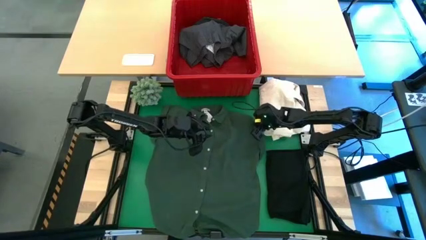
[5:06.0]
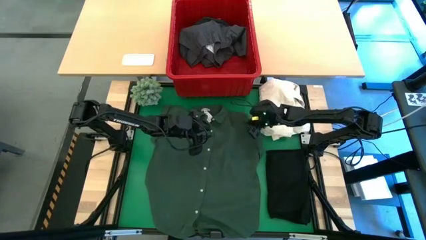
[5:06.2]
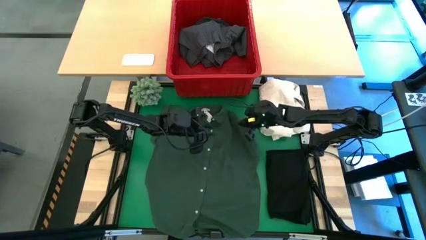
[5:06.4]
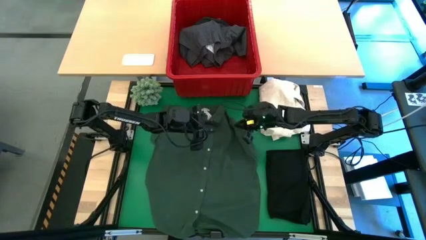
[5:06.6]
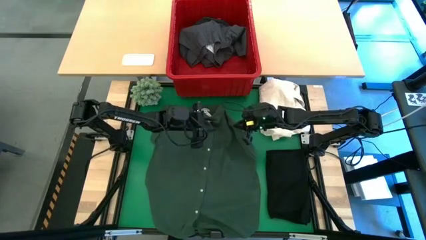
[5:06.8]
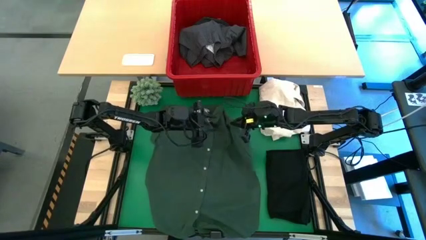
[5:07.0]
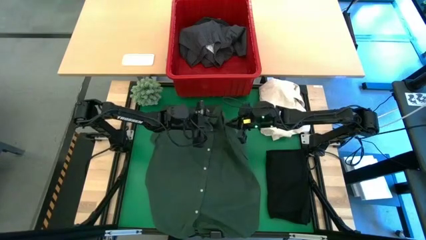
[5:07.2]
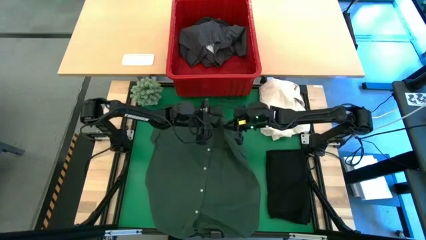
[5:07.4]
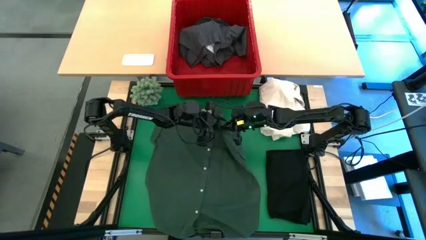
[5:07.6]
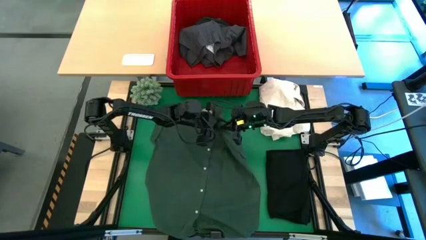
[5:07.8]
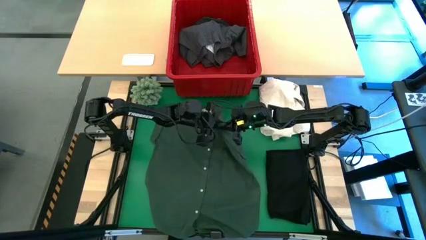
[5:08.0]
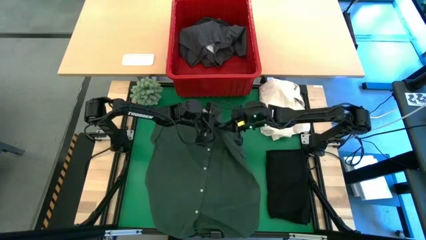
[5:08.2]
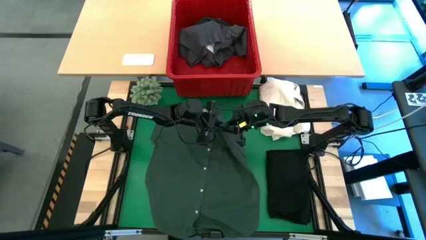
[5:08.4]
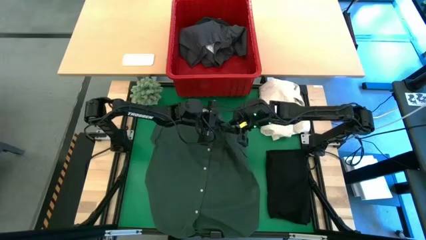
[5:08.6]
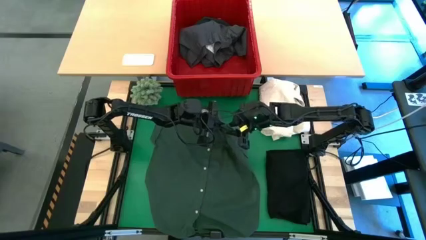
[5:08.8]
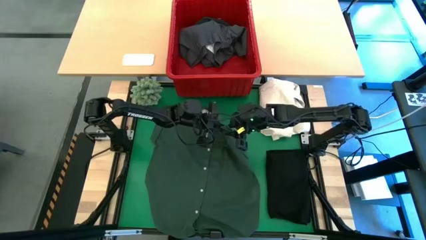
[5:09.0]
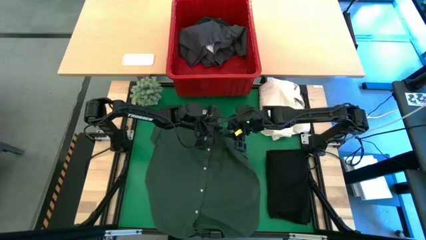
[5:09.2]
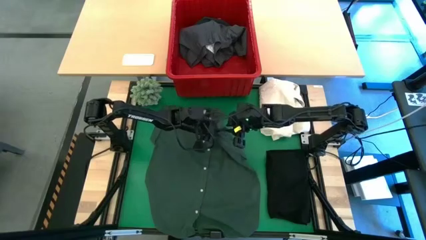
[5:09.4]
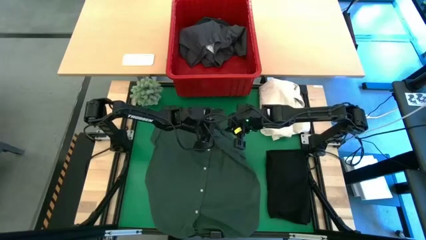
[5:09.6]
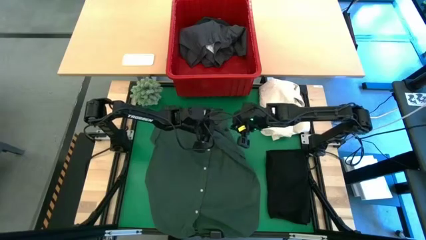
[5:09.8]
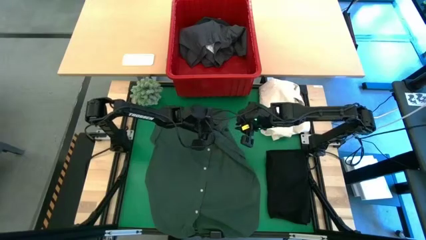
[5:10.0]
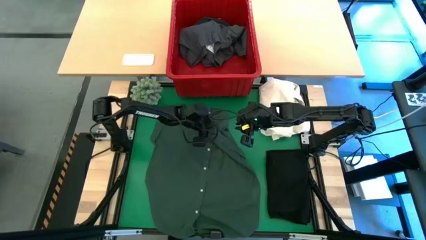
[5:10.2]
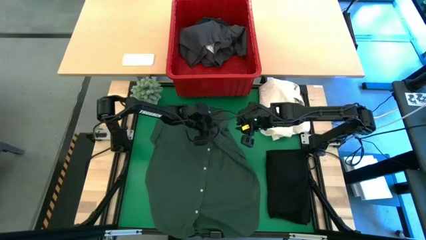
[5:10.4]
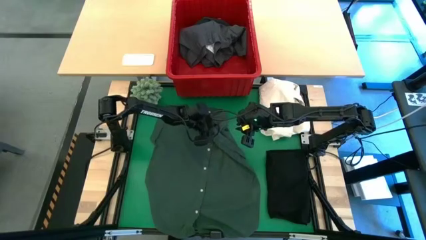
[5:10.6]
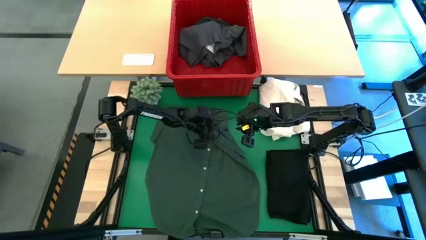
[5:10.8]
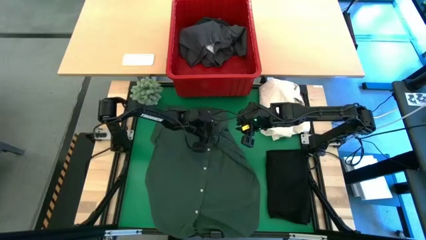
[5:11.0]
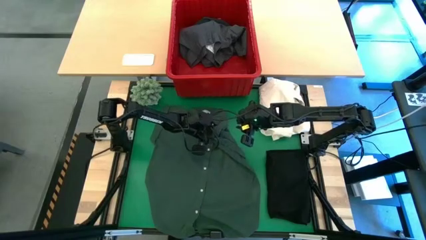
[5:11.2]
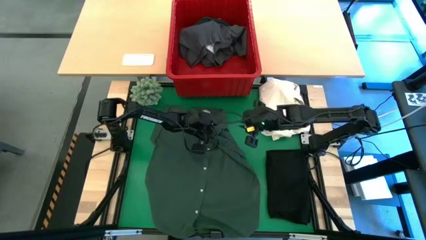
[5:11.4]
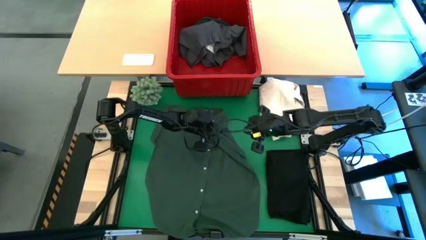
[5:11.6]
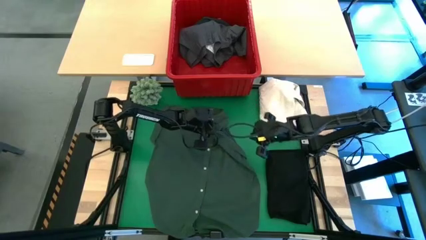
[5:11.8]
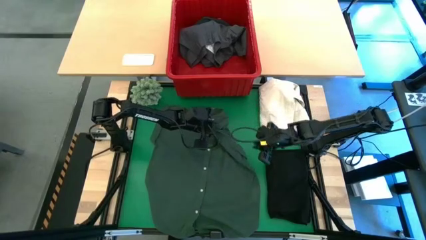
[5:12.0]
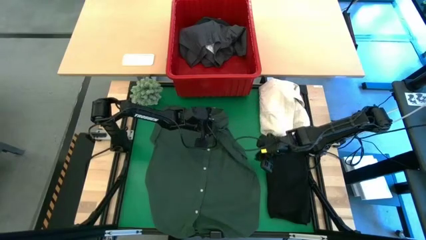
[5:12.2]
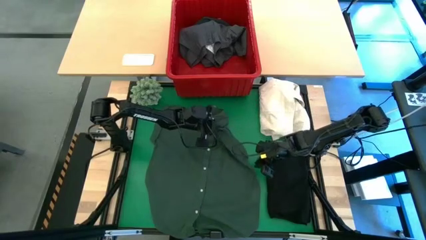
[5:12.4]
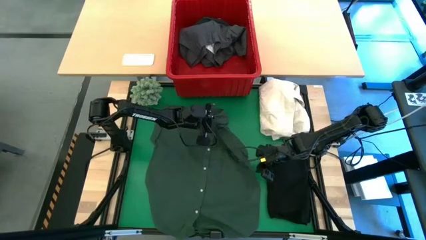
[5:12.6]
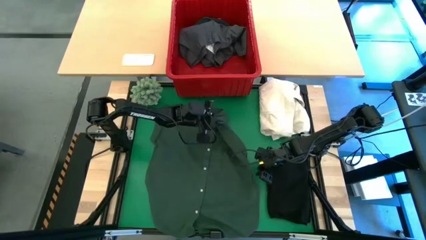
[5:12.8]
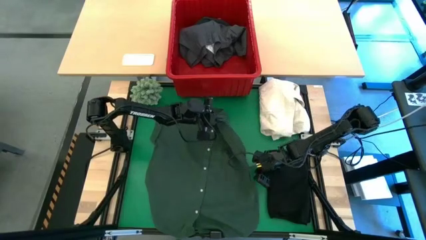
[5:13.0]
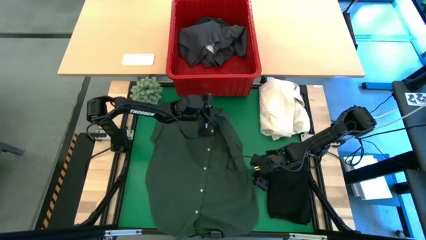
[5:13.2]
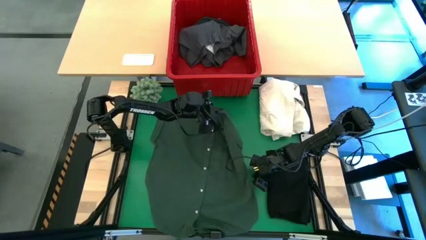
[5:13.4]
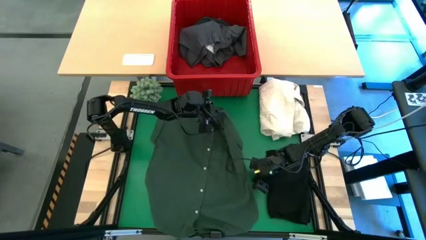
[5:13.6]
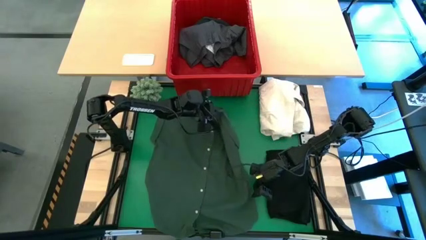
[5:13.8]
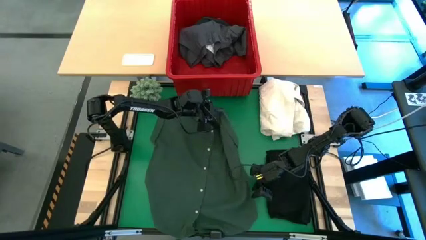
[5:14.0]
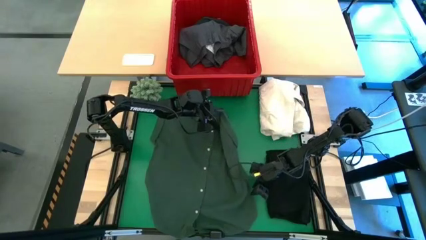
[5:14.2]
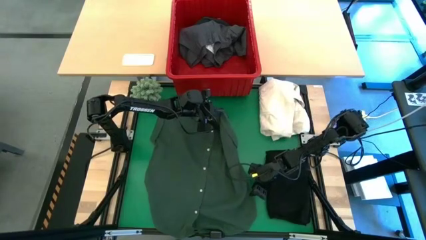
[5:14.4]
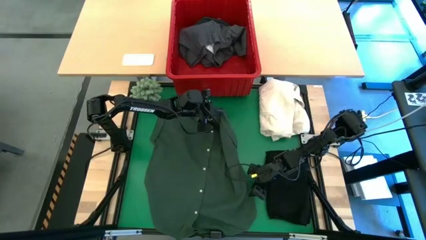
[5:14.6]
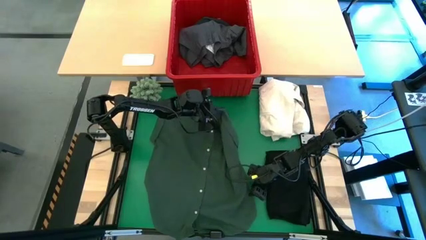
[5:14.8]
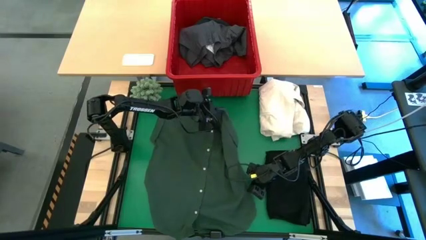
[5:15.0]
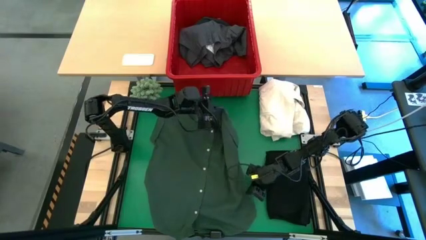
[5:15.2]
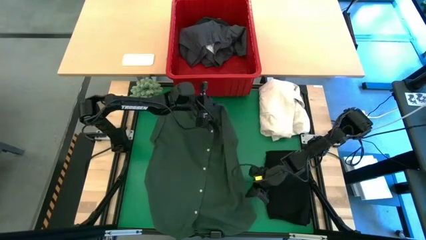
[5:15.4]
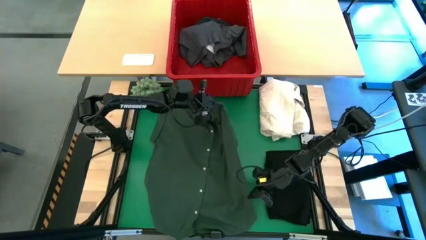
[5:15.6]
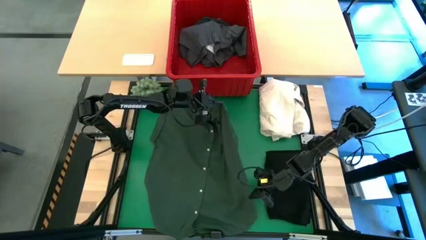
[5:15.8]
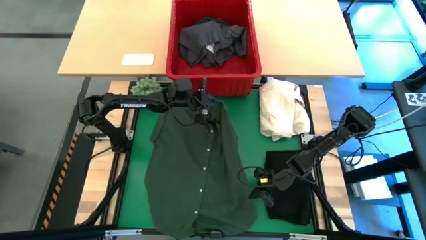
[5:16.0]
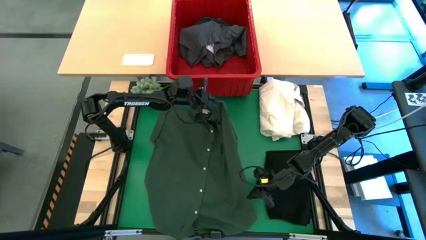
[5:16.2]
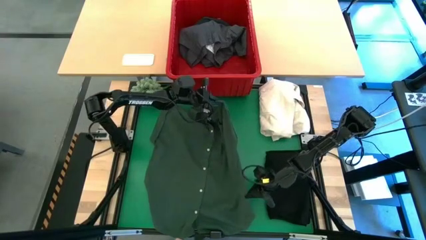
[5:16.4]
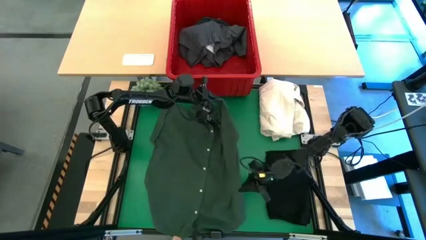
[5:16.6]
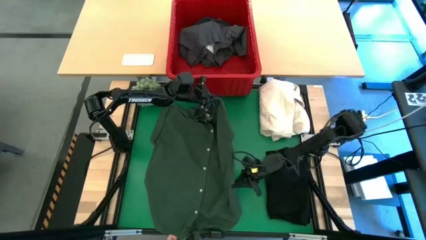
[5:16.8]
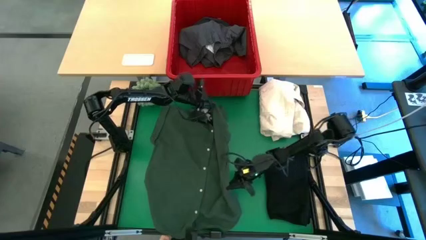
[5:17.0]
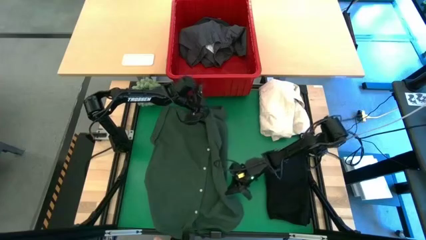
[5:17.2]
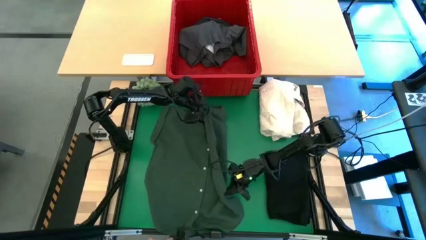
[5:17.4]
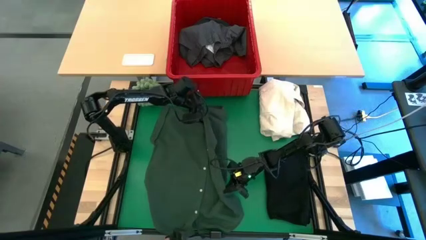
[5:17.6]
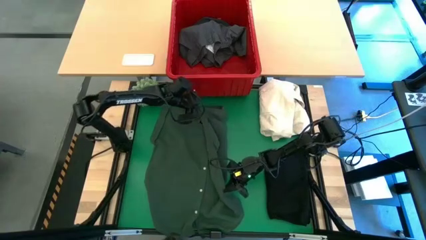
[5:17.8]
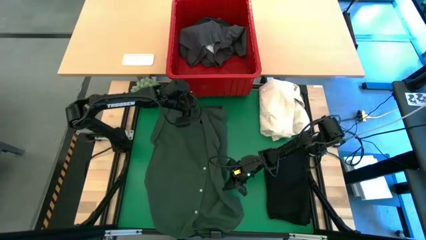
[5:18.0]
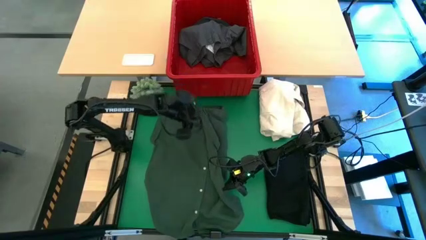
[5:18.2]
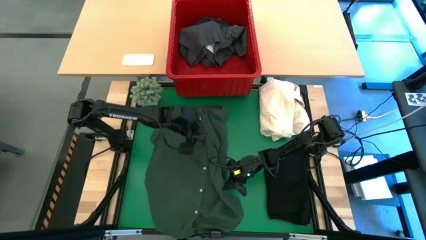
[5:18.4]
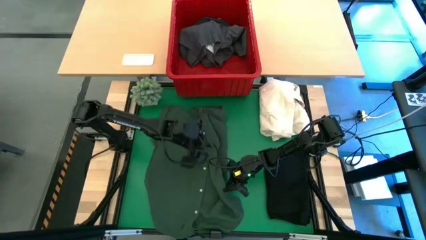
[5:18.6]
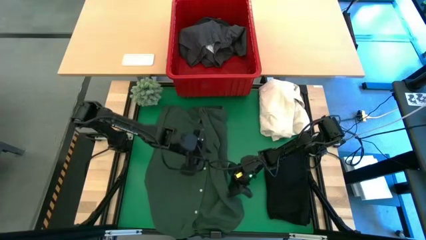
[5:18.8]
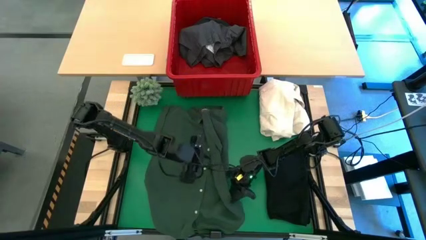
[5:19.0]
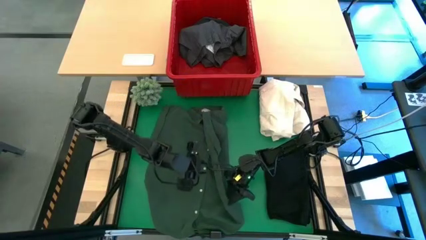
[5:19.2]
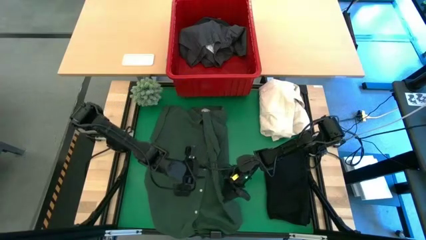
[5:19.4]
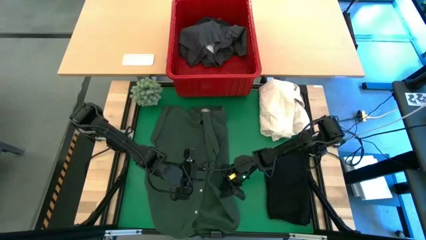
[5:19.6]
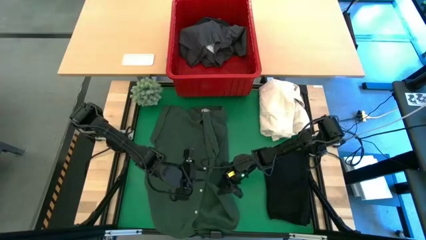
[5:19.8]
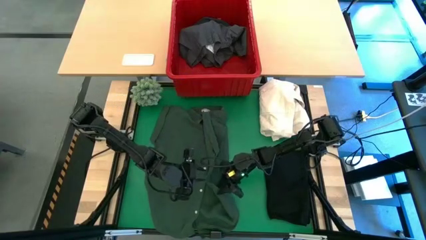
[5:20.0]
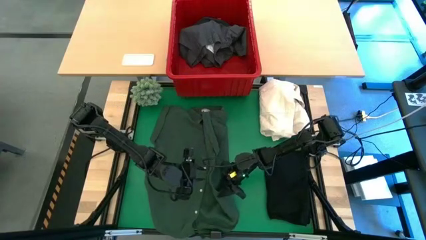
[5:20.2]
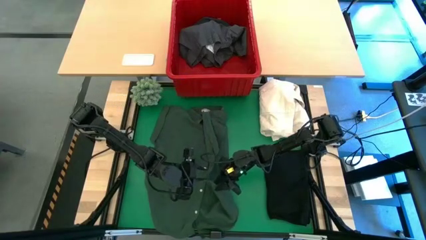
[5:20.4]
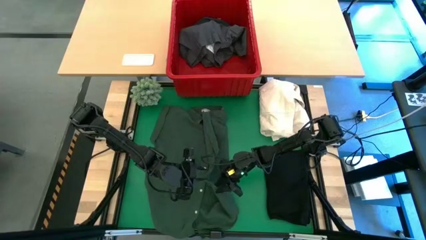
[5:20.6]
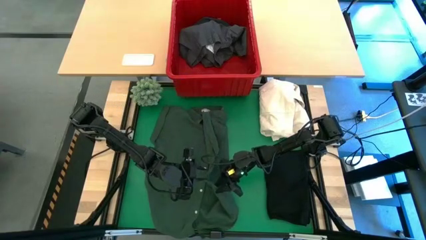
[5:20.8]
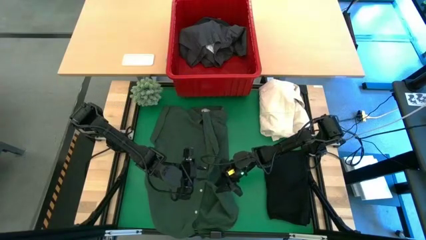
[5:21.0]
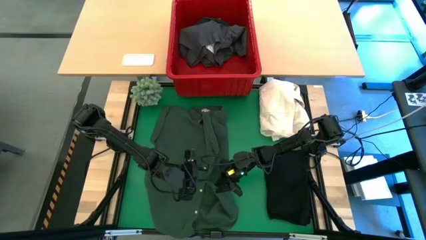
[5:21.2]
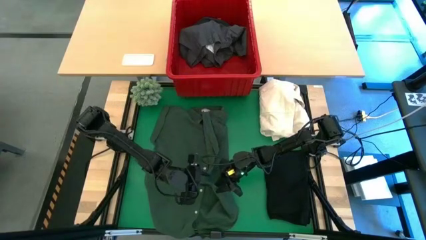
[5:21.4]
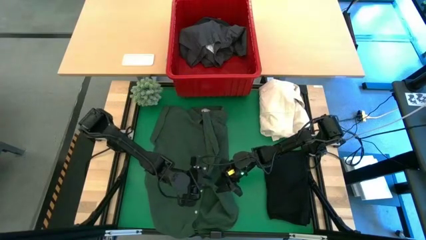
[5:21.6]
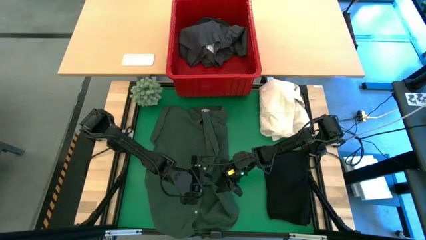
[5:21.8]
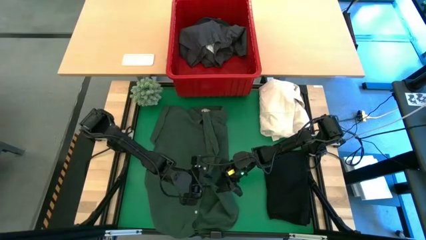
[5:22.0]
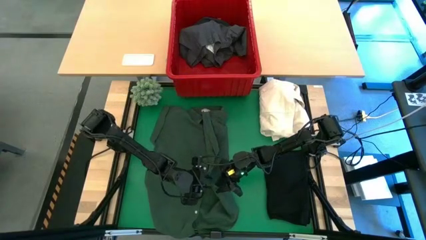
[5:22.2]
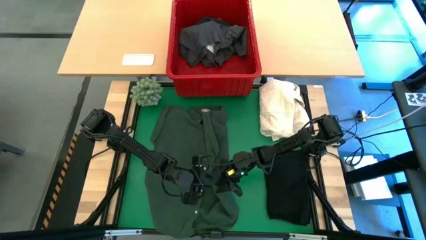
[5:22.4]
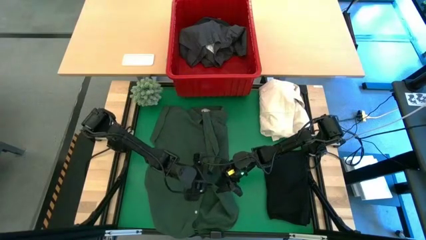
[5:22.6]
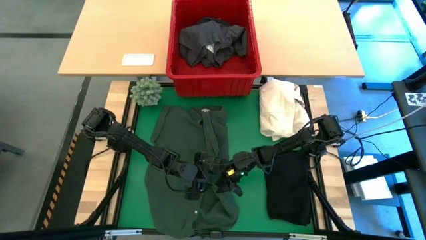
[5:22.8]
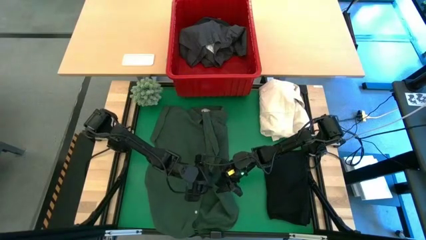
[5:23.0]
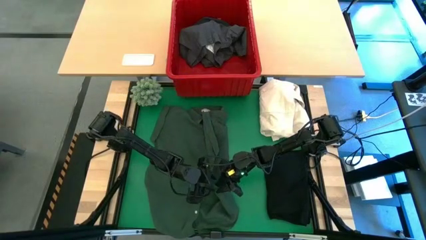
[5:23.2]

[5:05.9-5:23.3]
Task: Fold laundry
Fold the green polo shirt
